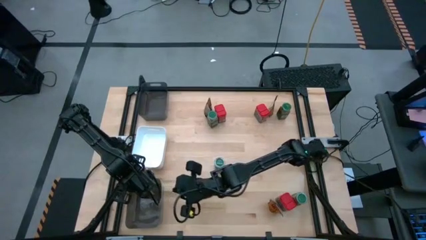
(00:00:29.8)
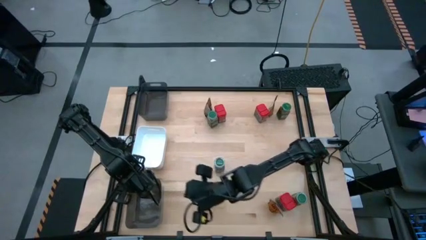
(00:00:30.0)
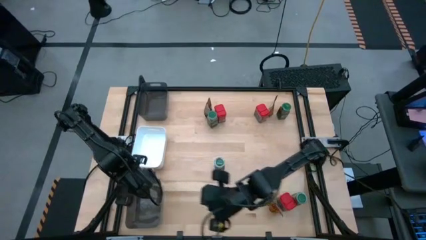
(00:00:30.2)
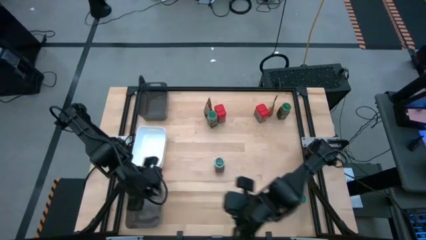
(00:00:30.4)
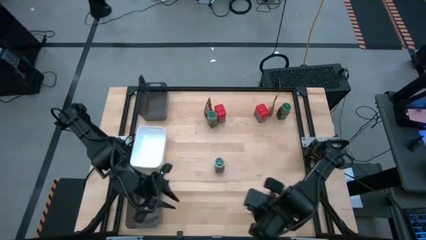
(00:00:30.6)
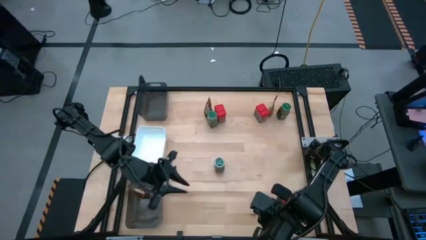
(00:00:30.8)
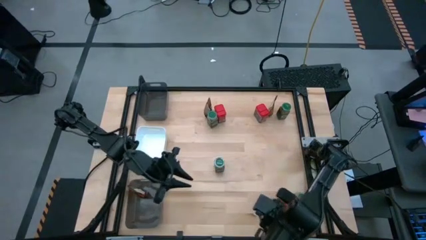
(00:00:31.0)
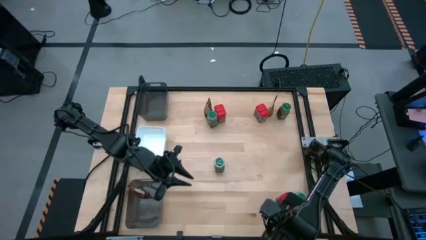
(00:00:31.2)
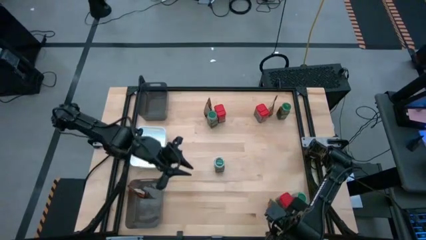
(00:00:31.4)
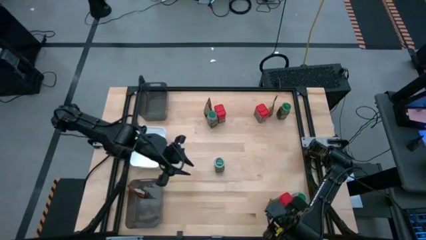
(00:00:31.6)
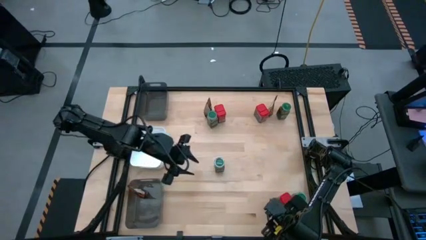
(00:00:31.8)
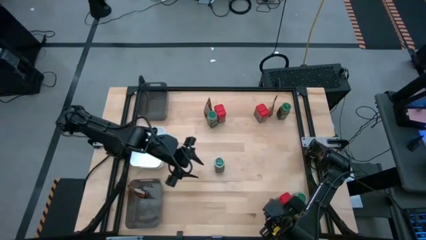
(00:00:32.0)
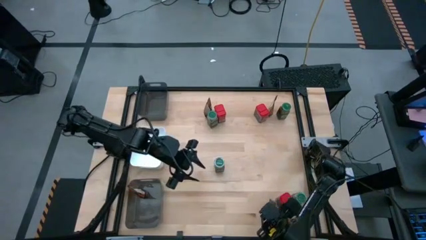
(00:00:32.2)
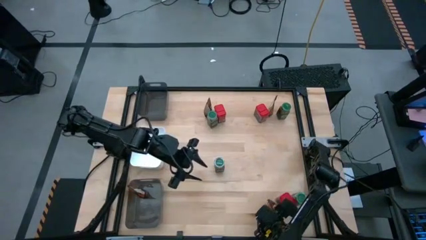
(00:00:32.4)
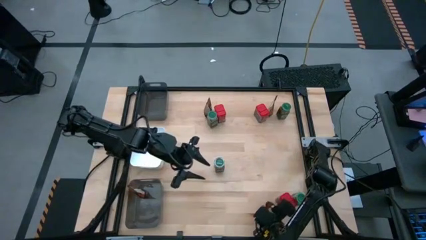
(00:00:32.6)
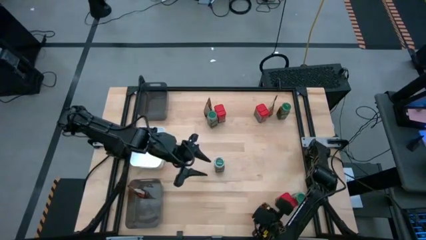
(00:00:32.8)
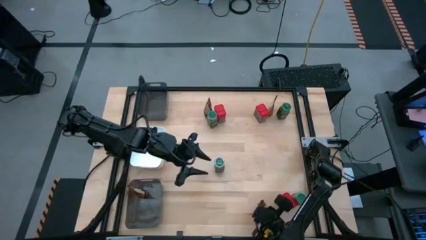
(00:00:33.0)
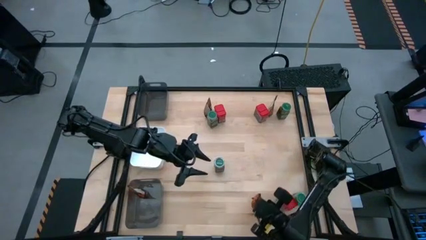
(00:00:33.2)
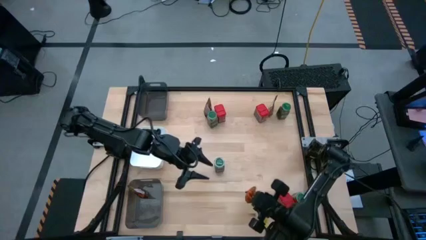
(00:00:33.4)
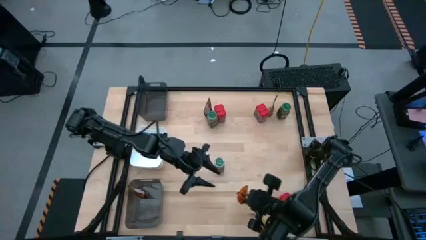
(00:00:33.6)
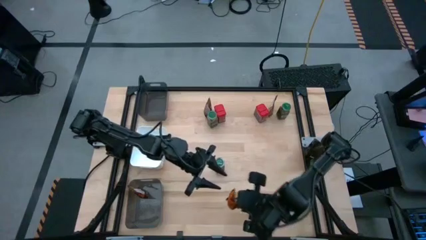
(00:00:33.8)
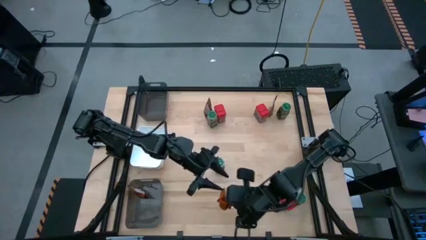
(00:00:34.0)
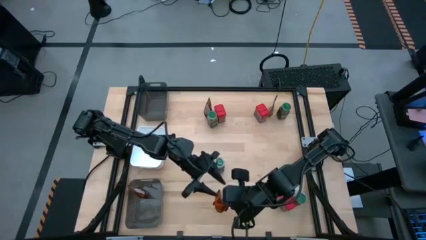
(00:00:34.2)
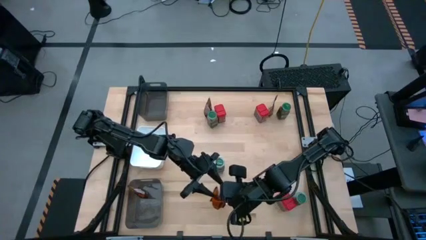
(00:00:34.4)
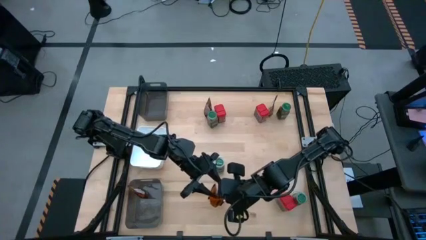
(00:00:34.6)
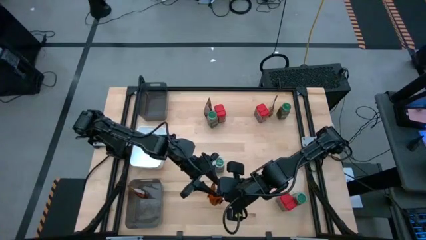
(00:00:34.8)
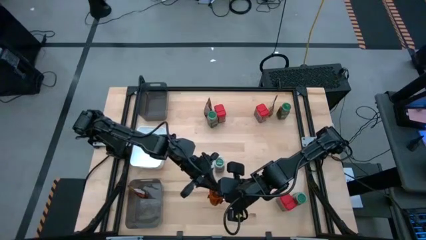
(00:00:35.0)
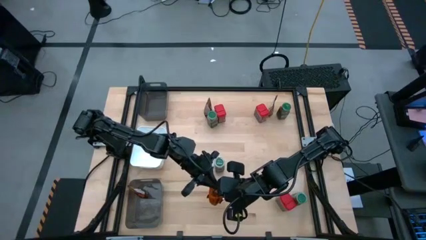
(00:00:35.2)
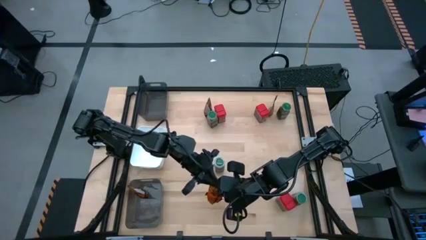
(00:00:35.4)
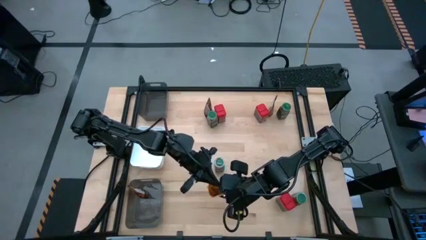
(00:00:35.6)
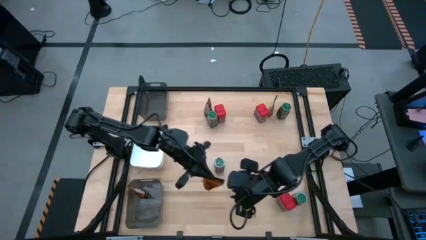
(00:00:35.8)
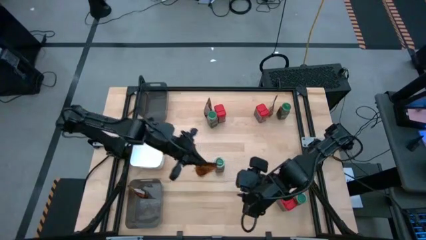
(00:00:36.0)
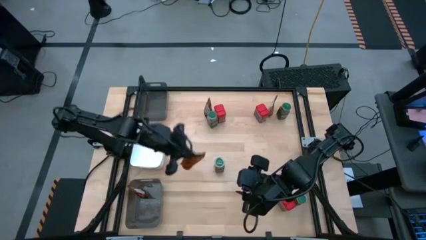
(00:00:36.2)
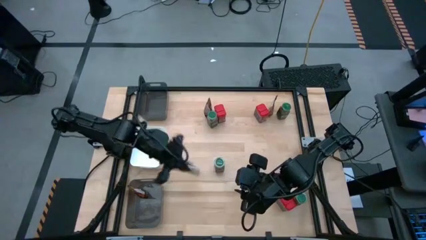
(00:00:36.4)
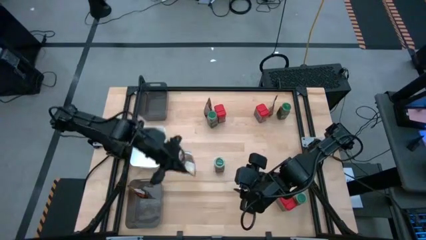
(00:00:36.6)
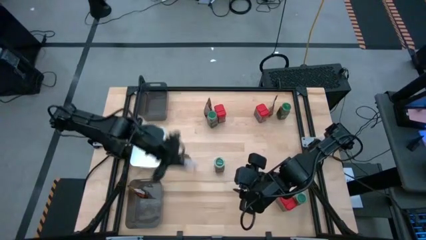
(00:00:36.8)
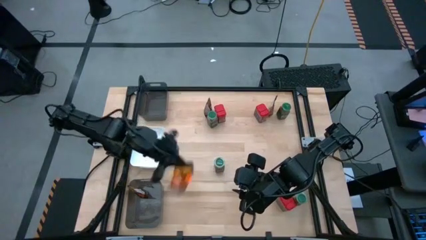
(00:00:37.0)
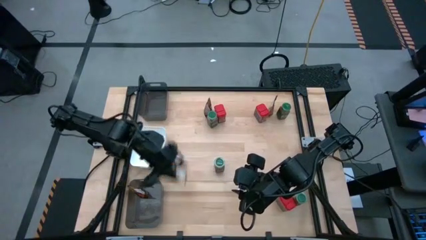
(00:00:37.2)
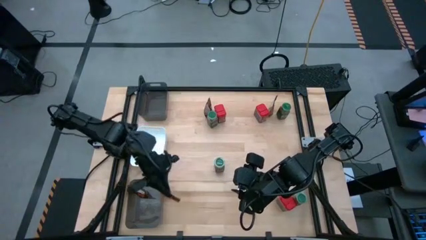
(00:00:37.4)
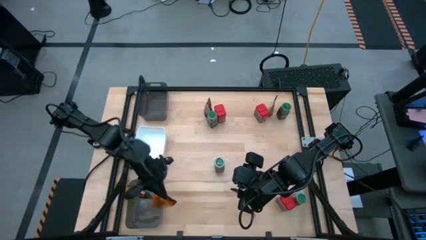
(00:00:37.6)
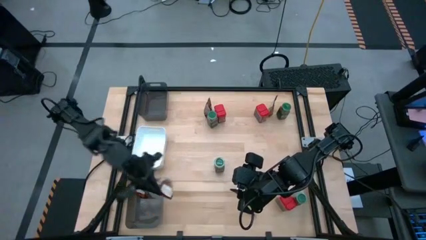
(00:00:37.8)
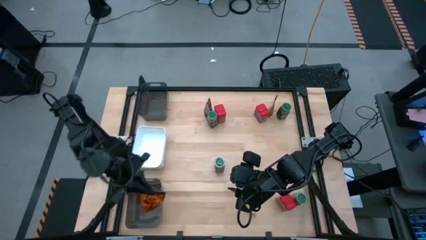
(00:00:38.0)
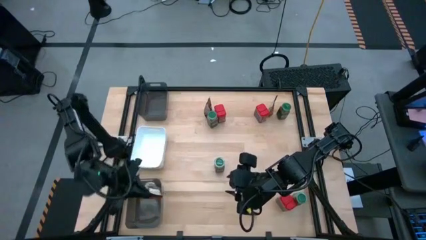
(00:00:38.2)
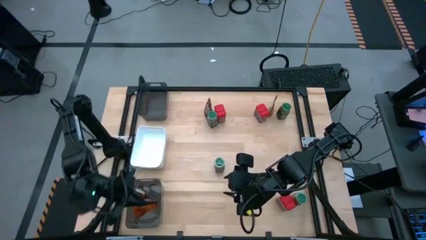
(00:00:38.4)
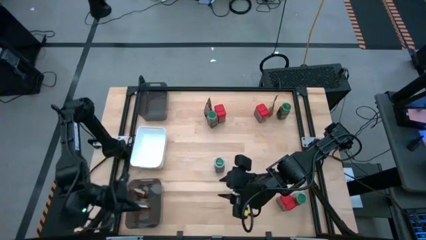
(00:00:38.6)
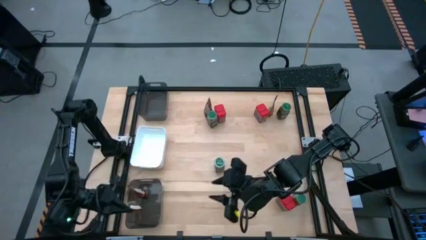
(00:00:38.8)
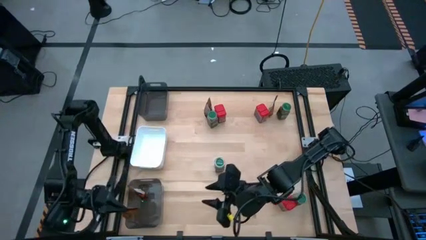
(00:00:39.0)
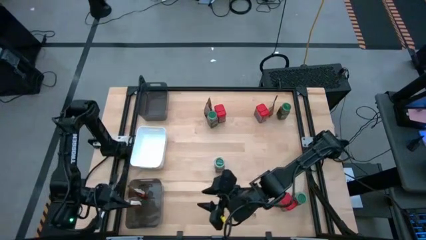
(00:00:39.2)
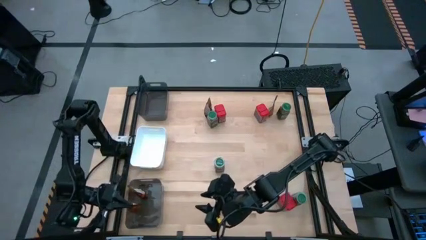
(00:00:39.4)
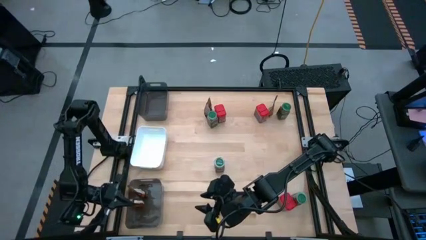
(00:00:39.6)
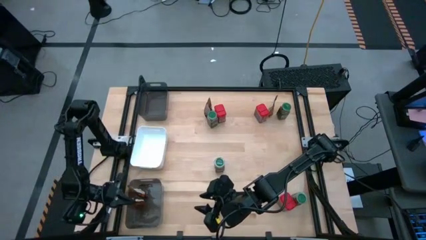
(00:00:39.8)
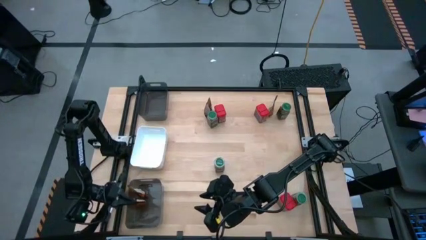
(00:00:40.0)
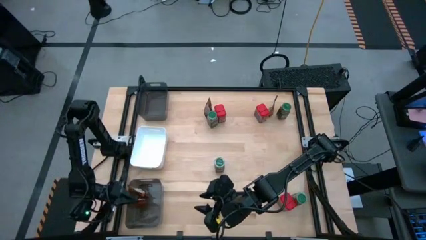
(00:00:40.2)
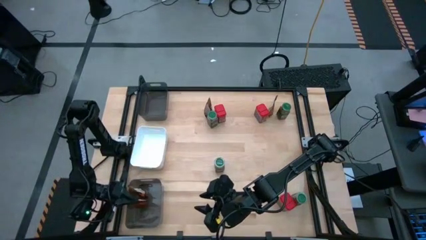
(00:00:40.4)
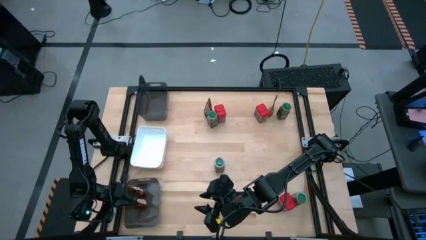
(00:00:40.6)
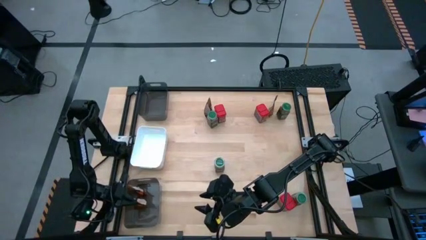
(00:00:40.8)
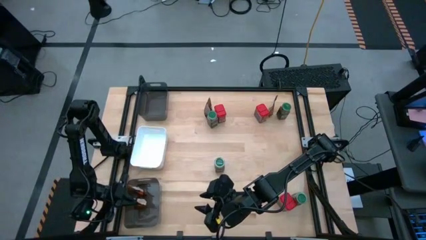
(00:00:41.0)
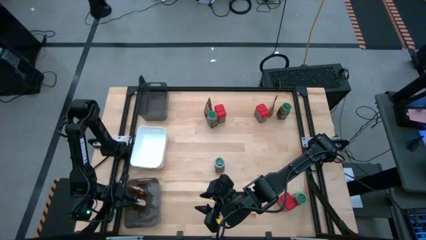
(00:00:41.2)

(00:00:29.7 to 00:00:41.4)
Task: Sort spices by type
Put the orange seasoning bag into the bottom black bin
